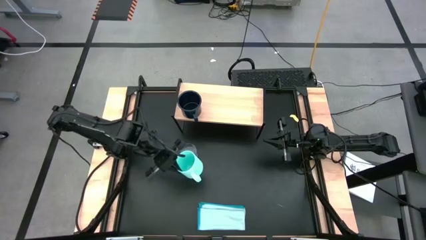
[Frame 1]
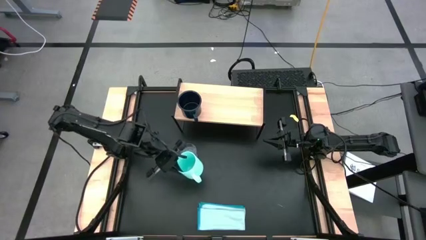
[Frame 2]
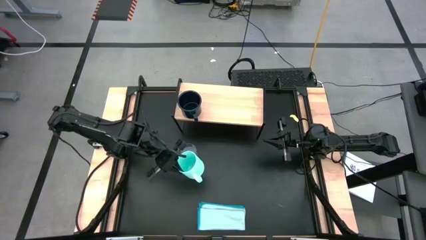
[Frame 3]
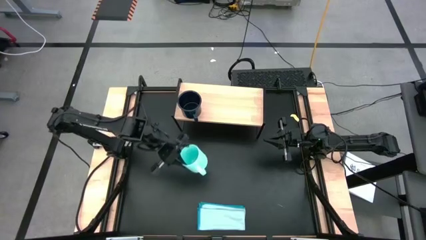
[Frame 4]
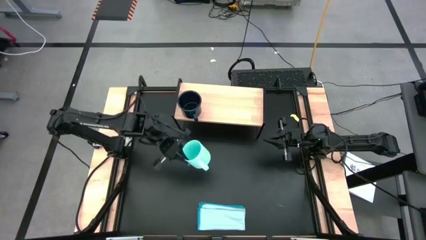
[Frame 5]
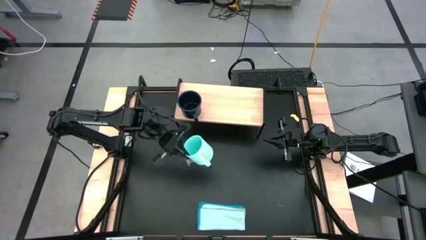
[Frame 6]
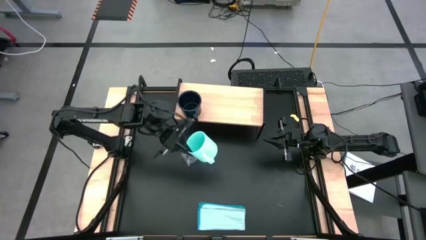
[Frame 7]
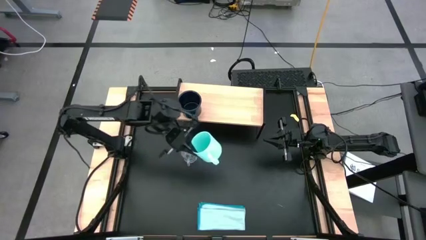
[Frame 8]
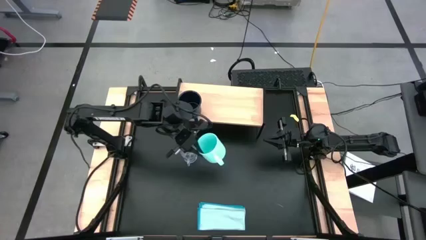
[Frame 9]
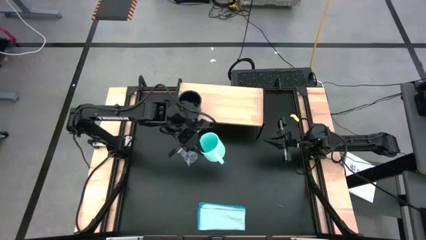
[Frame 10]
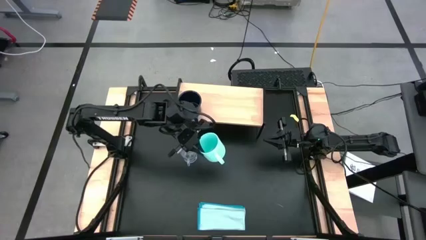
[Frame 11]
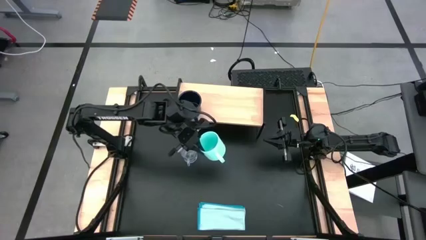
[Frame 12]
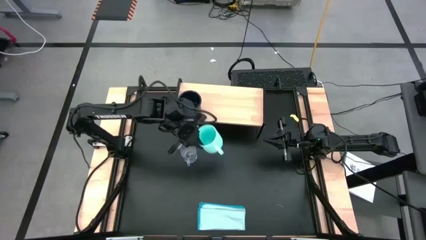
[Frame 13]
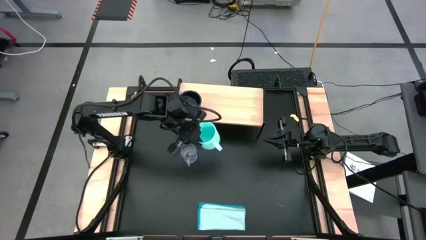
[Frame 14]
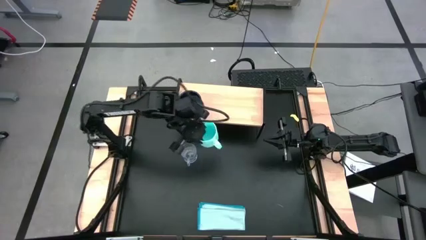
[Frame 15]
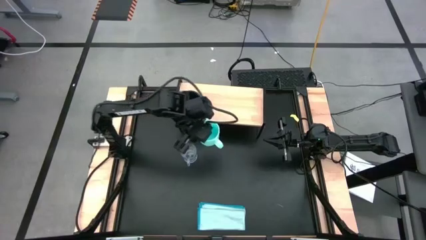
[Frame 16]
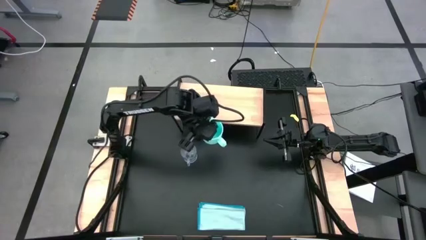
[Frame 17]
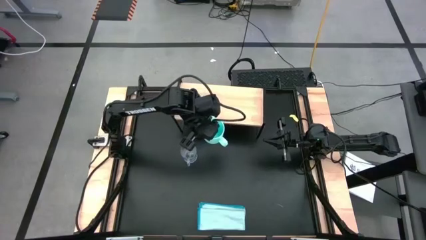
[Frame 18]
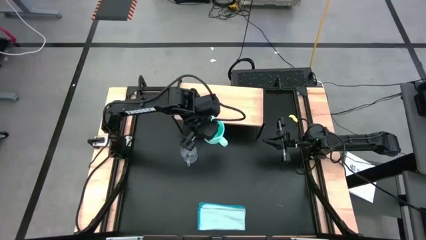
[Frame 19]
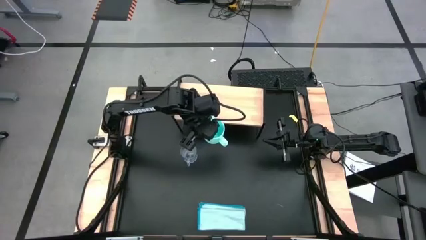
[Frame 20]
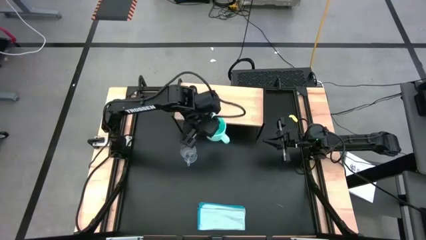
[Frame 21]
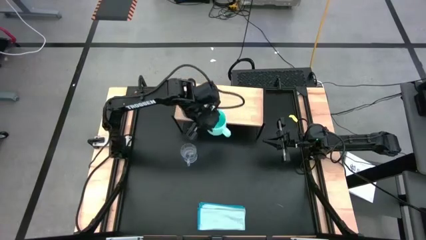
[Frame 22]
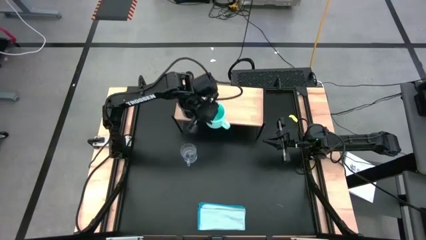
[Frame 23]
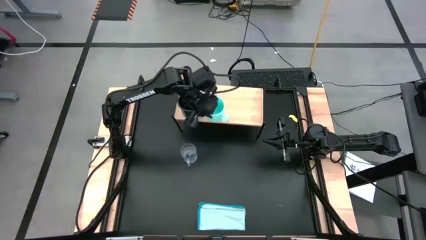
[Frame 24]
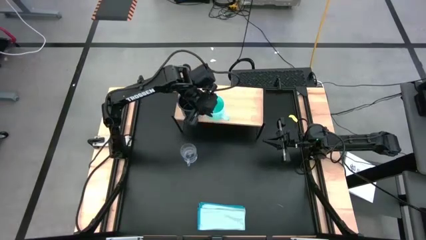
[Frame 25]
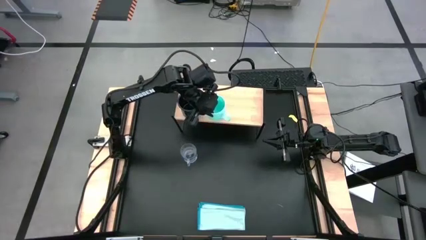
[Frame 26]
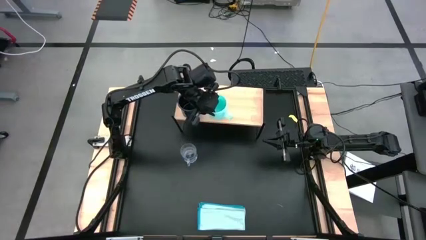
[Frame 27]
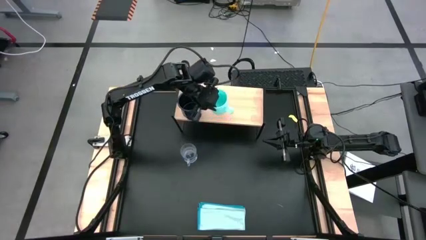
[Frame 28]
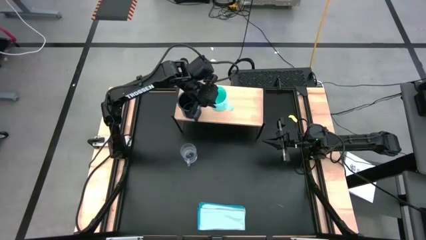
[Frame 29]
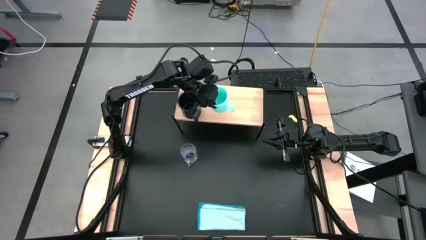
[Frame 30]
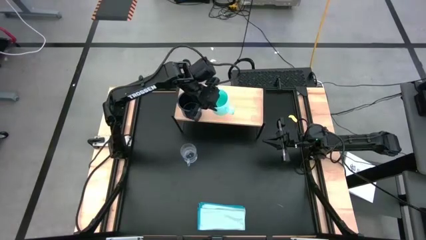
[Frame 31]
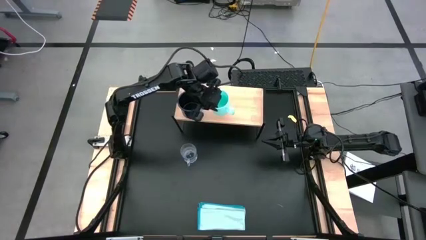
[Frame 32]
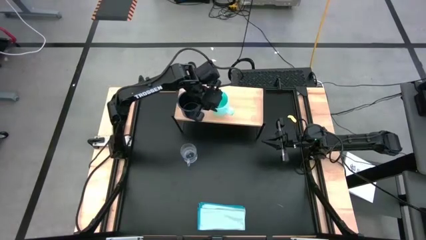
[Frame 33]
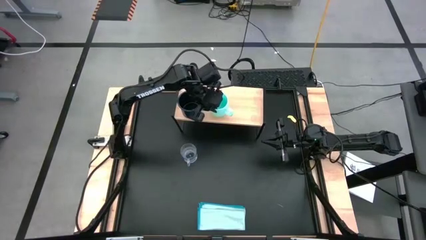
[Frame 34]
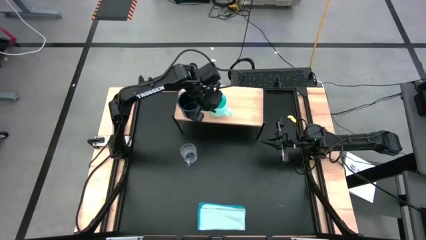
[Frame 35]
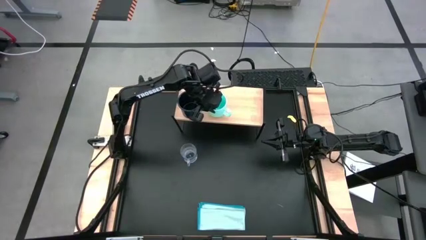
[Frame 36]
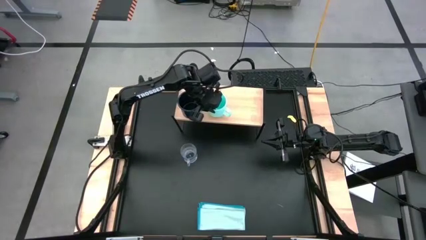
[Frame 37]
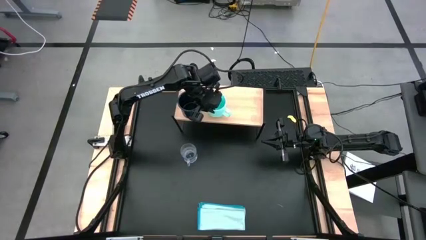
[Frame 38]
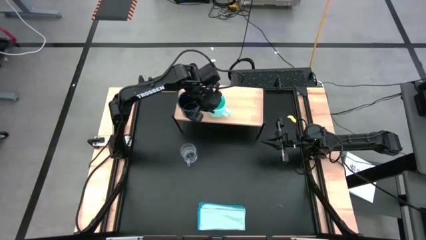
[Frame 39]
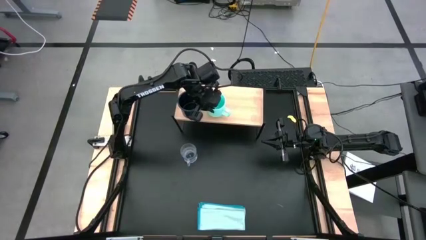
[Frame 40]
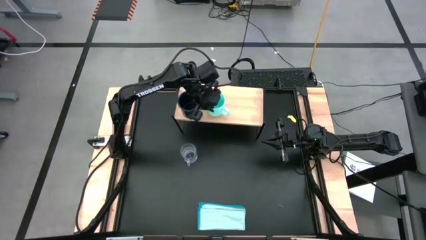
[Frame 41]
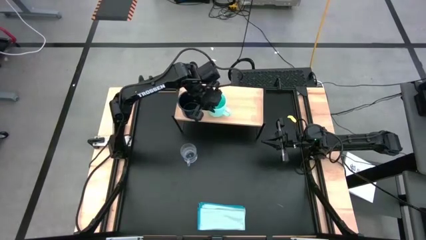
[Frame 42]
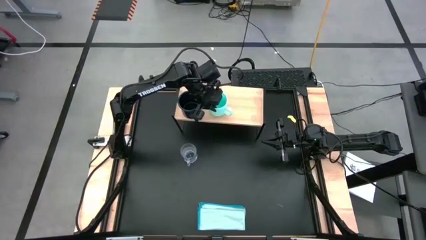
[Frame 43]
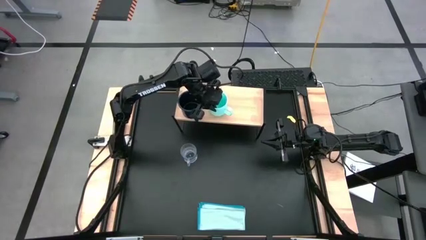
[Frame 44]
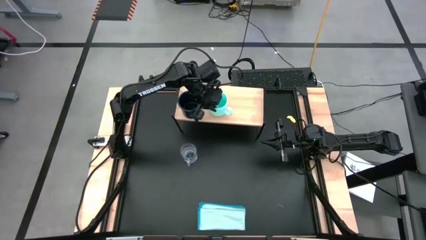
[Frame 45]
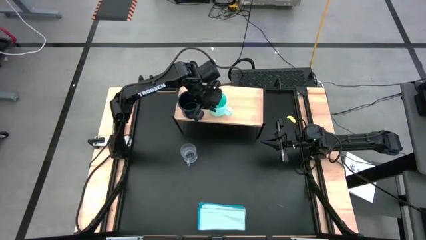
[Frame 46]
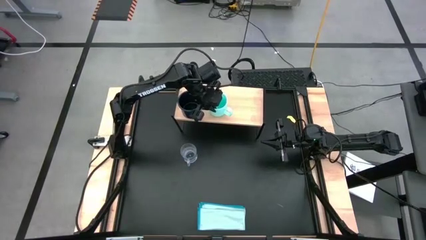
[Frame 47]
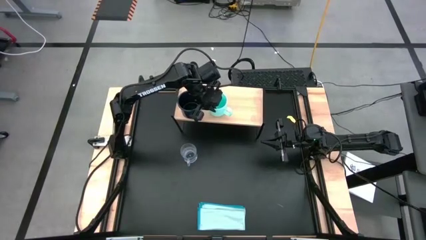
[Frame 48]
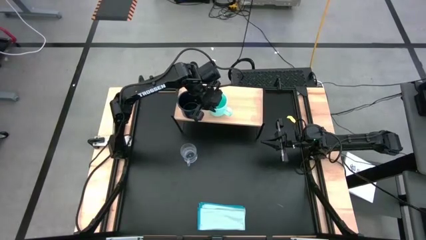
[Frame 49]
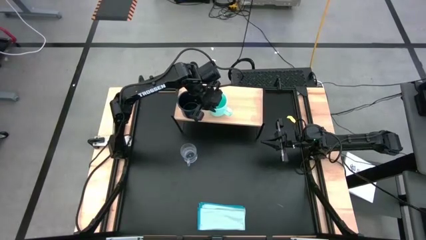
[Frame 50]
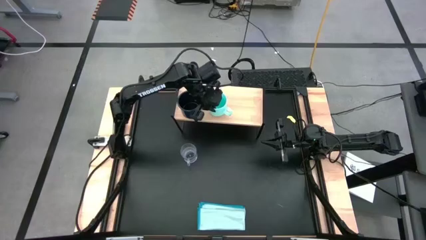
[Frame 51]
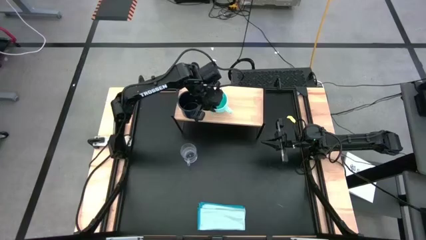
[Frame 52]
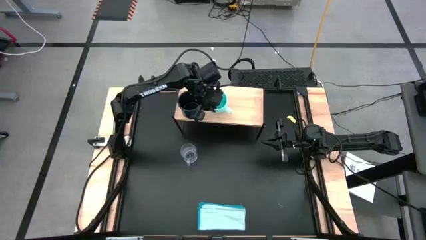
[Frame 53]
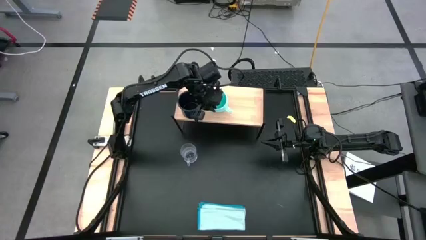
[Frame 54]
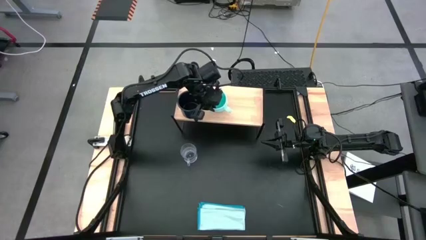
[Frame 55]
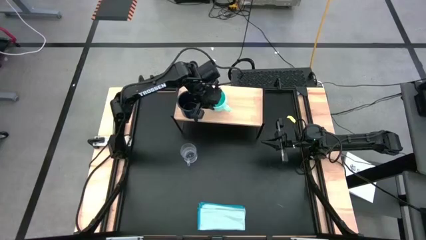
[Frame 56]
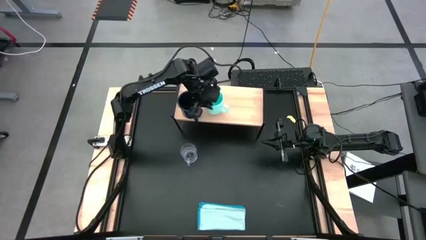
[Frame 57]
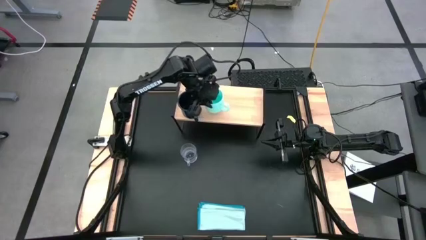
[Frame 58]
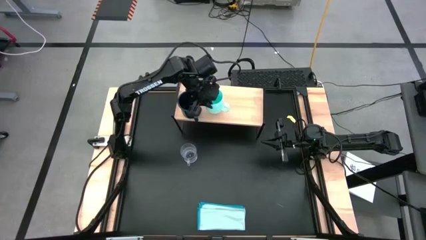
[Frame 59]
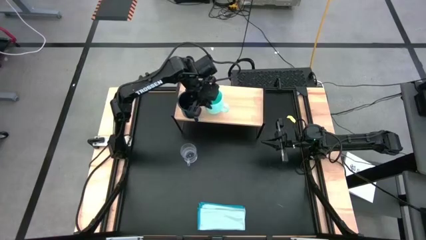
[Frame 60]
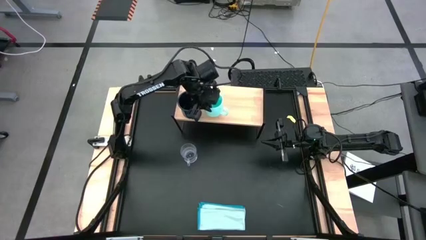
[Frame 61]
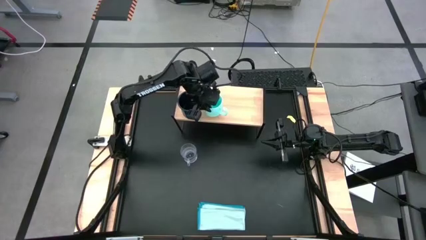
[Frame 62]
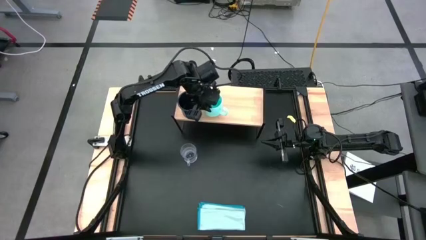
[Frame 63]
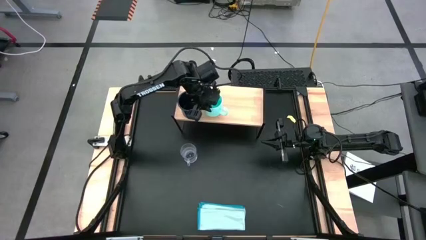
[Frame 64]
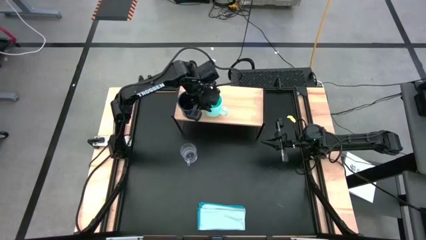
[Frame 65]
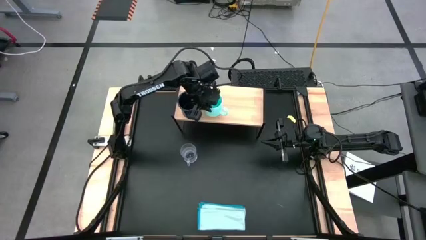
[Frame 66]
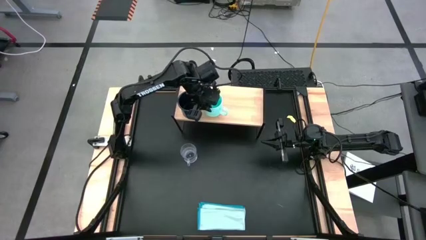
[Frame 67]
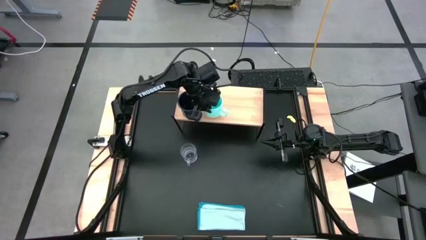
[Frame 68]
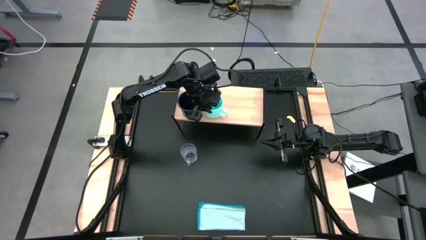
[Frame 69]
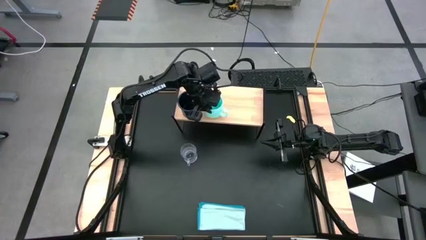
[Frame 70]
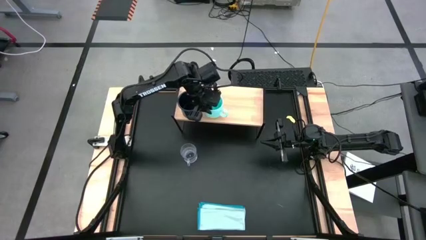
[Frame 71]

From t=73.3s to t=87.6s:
Task: Stack small to large cups/mugs on shelf
Put the blue mug on the shelf
